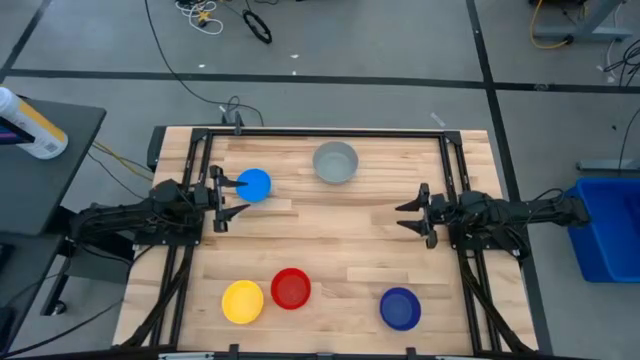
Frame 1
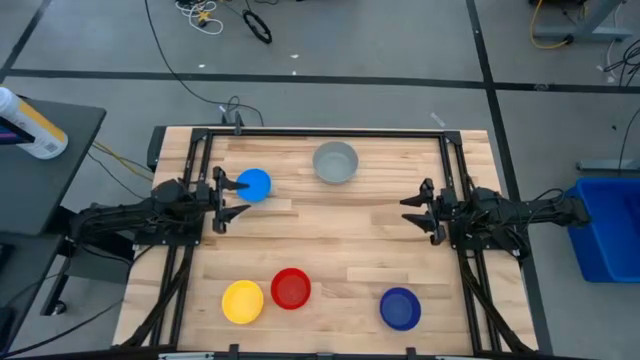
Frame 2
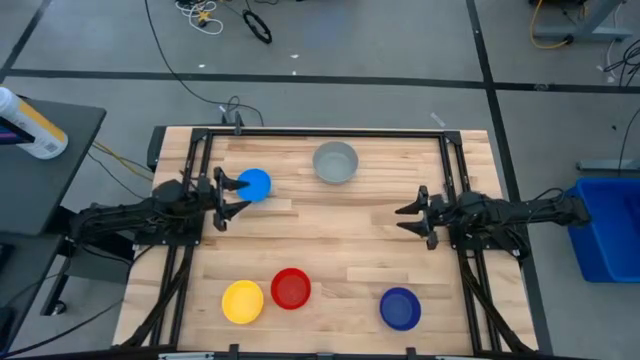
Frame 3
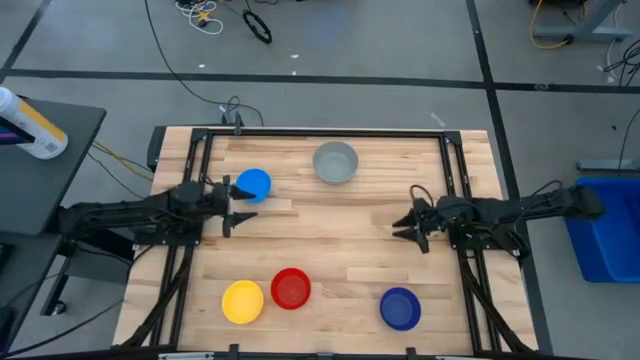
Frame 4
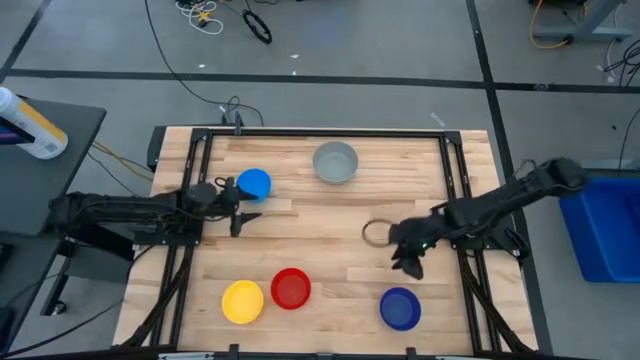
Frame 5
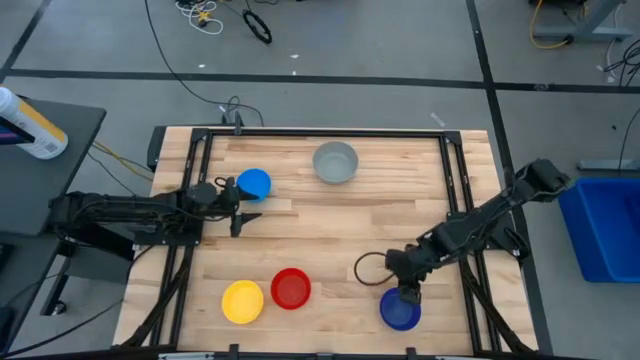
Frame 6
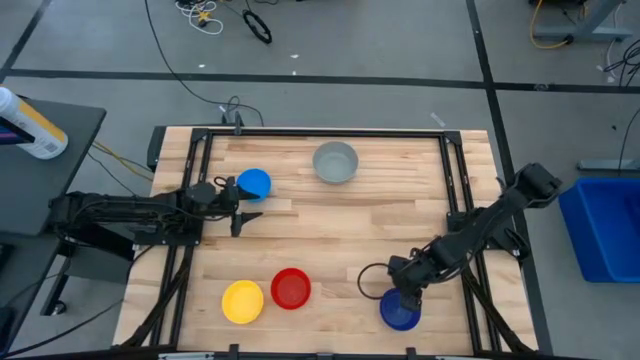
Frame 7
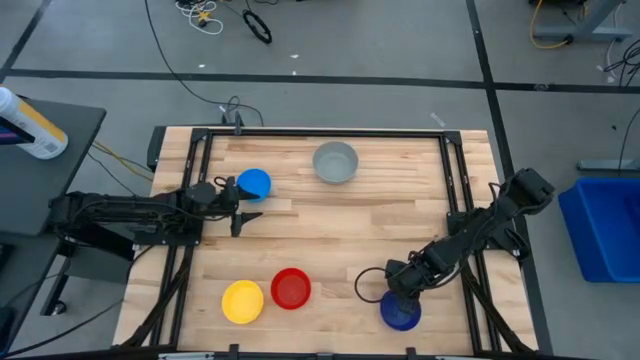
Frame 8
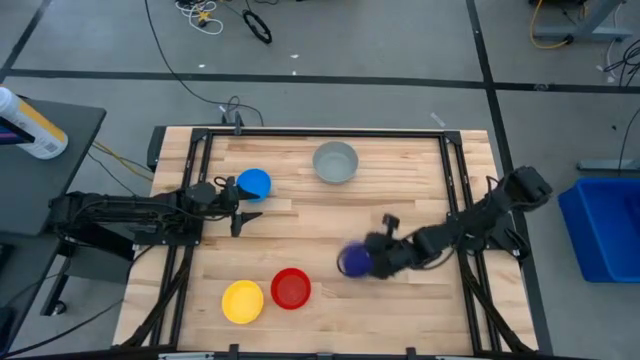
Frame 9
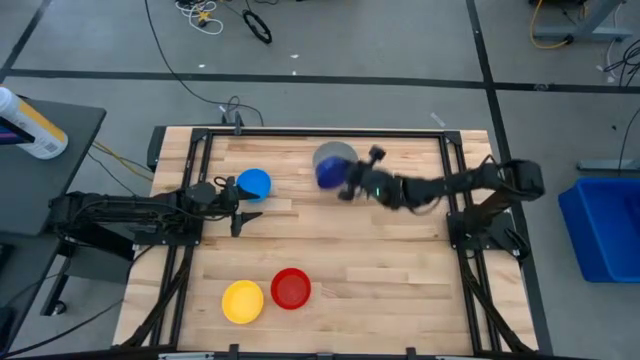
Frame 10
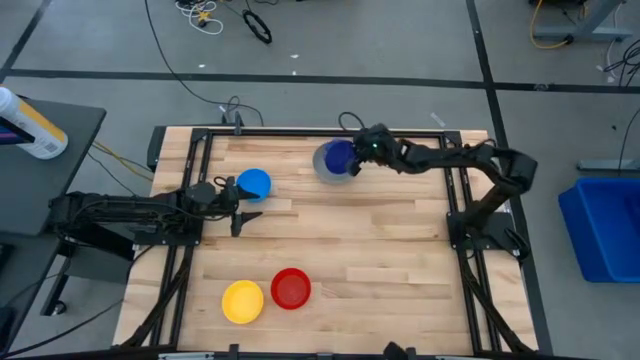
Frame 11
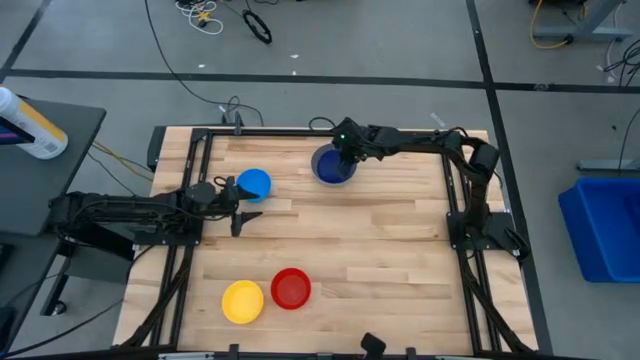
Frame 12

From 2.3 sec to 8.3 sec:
Stack the dark blue bowl on the gray bowl

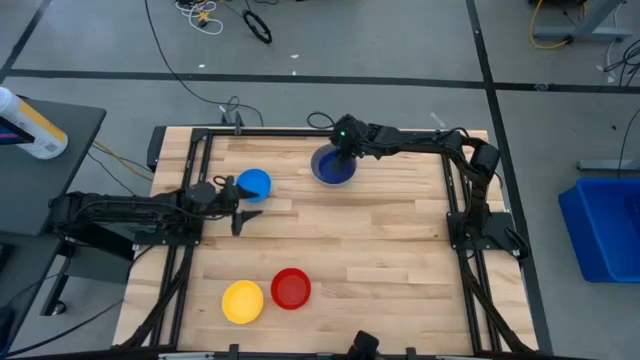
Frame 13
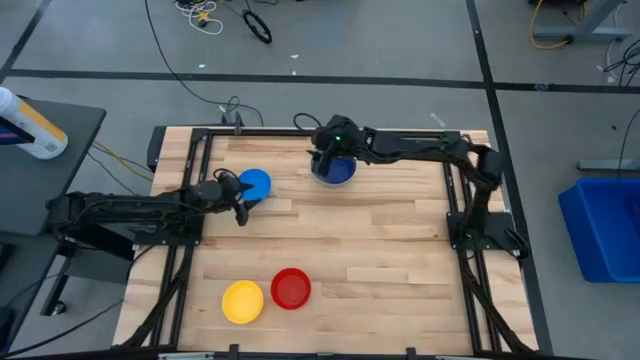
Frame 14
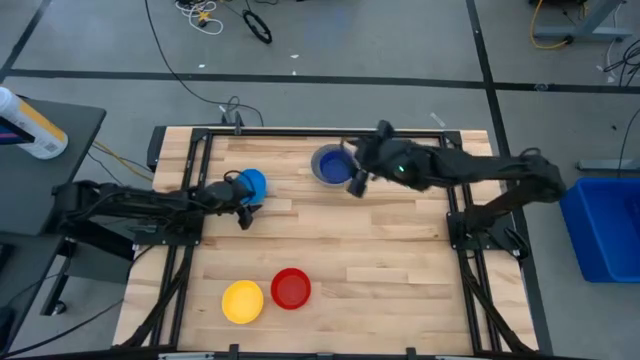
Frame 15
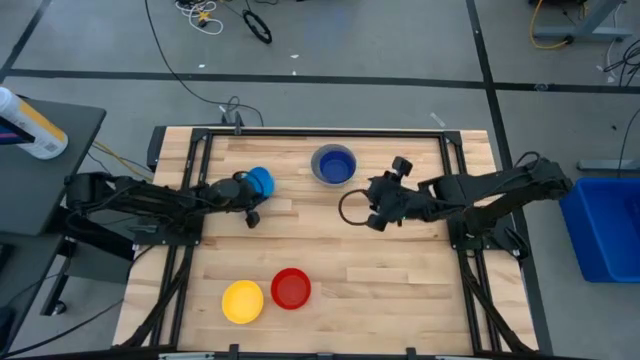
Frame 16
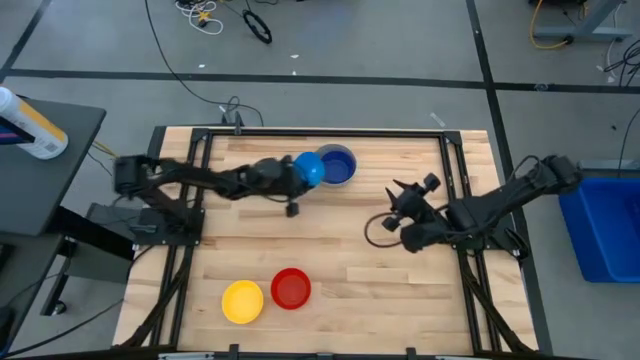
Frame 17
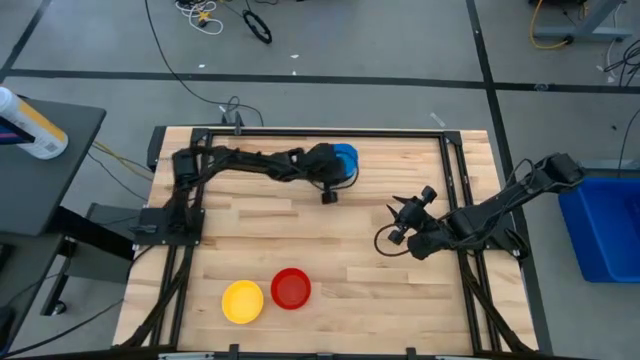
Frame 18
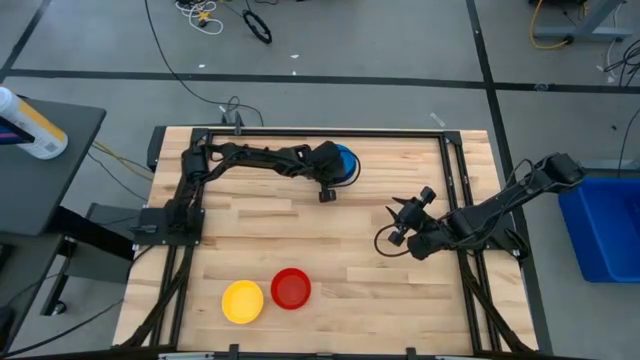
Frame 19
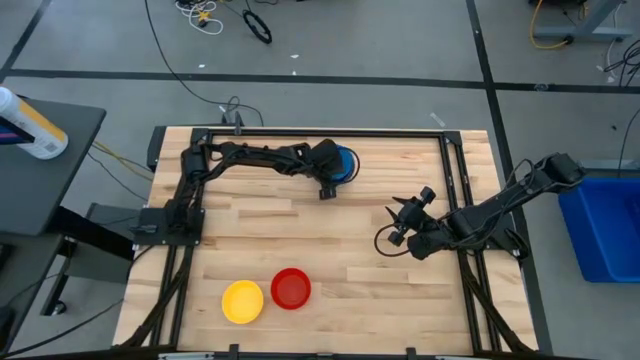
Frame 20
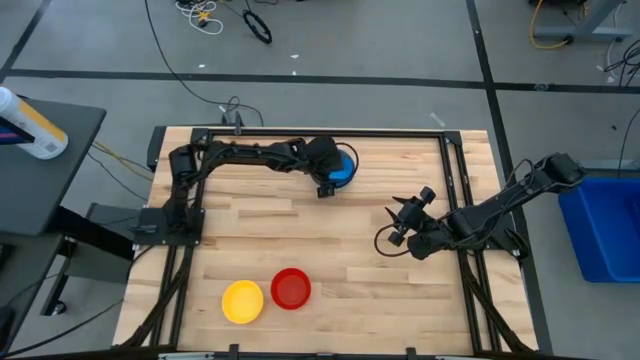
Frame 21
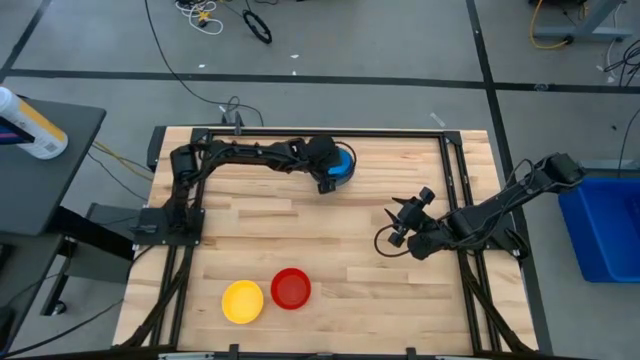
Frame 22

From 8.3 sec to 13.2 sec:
Stack the blue bowl on the dark blue bowl

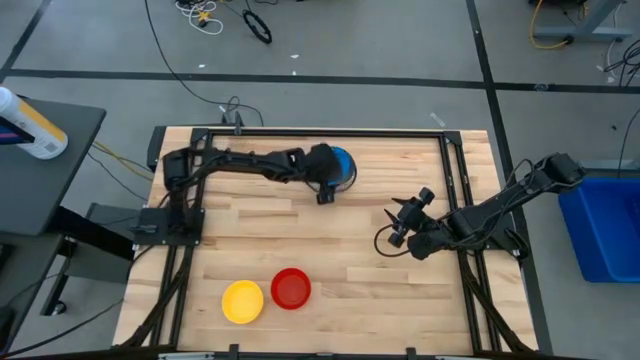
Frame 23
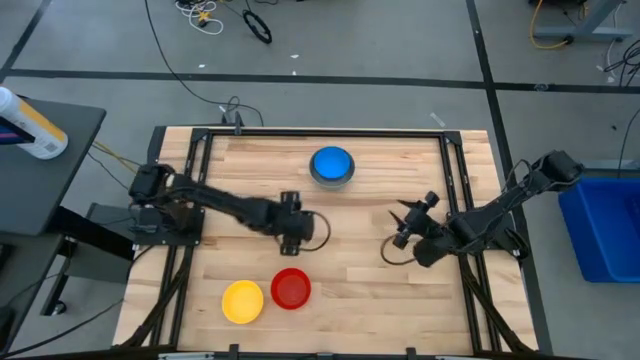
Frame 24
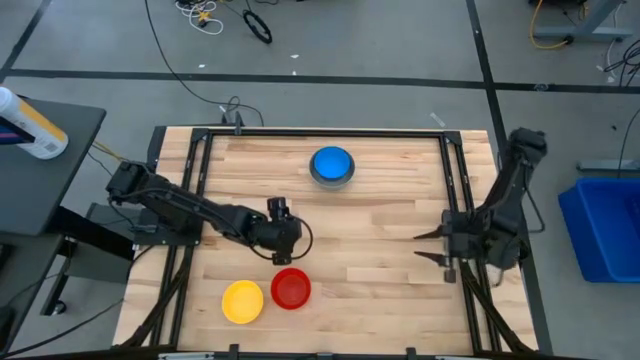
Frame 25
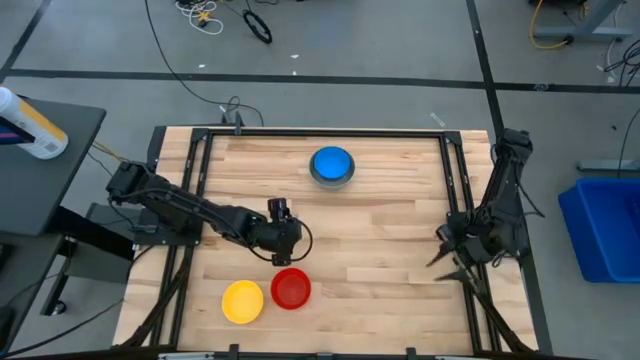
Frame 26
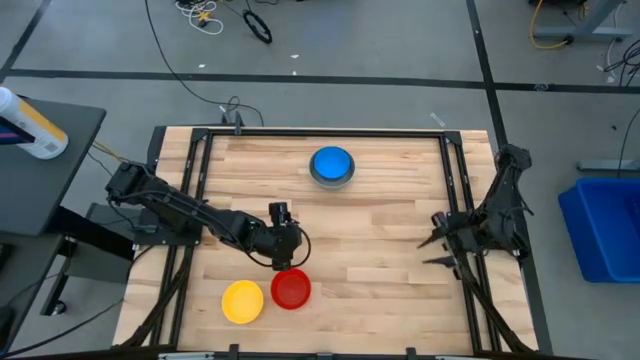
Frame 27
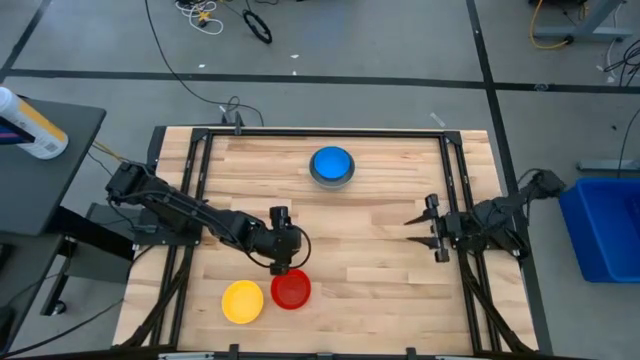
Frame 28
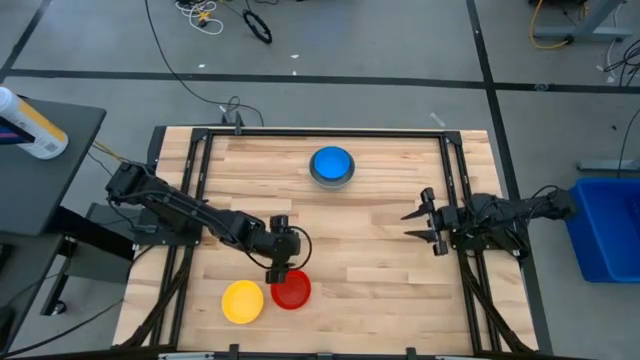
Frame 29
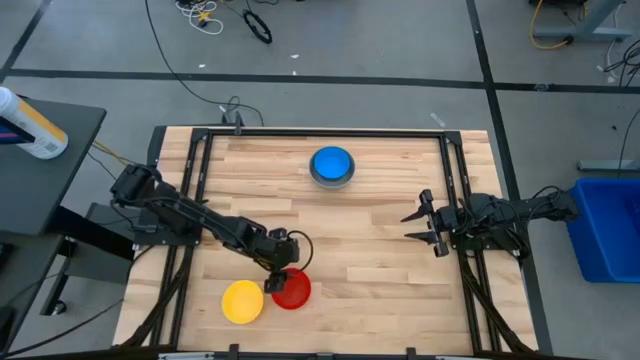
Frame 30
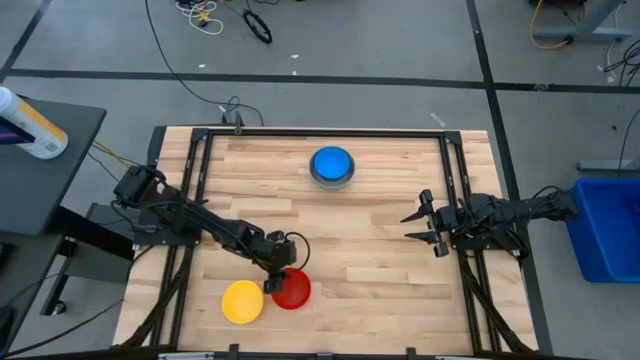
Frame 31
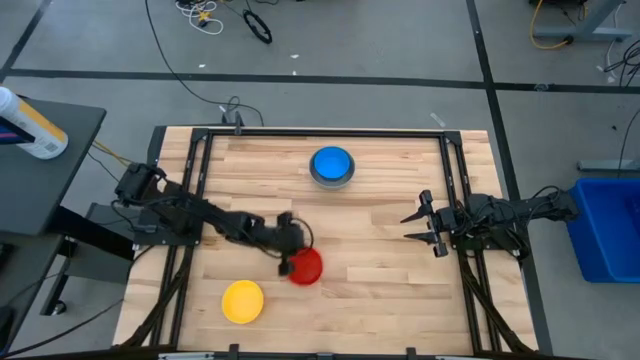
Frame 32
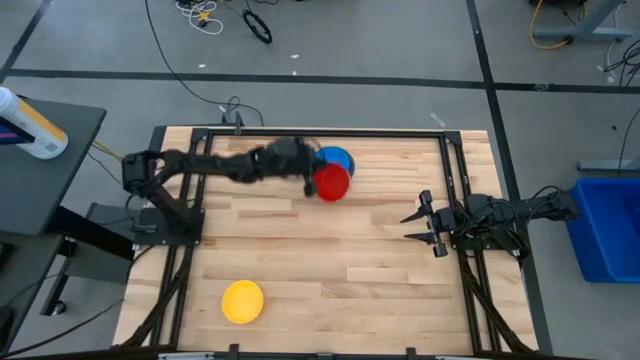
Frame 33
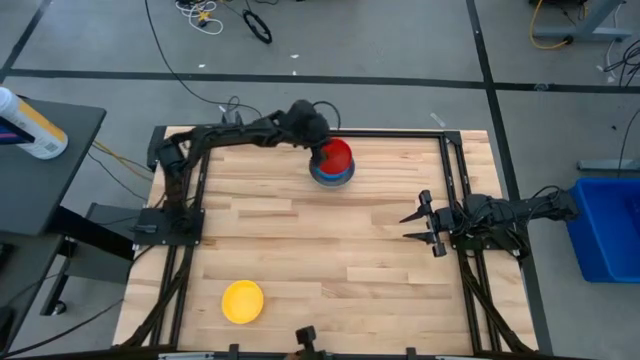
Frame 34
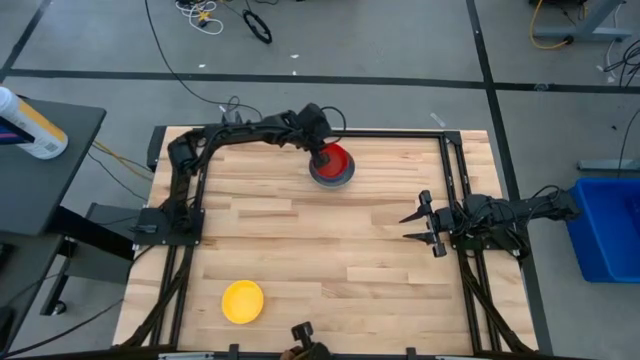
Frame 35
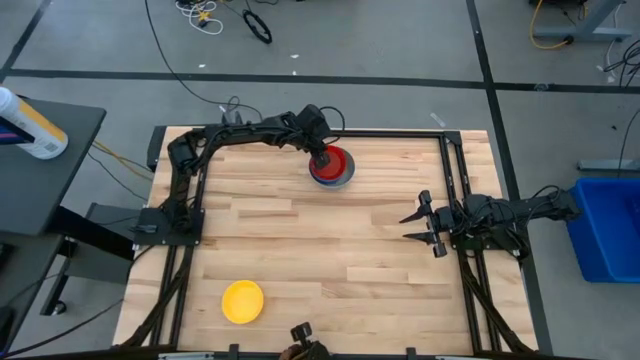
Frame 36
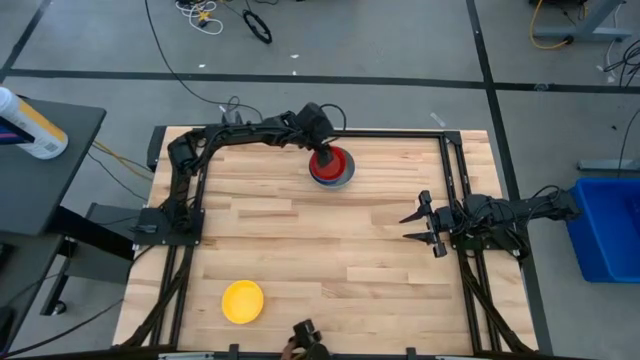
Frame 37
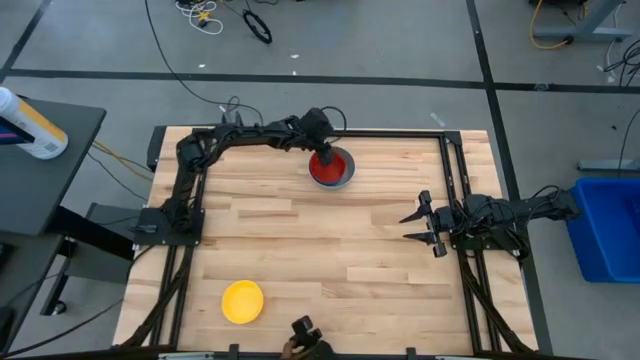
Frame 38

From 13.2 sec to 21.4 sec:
Stack the red bowl on the blue bowl
